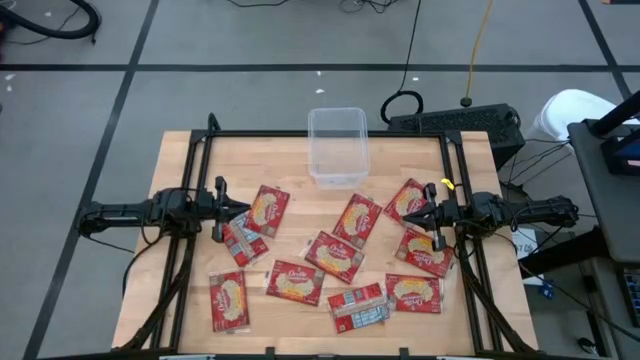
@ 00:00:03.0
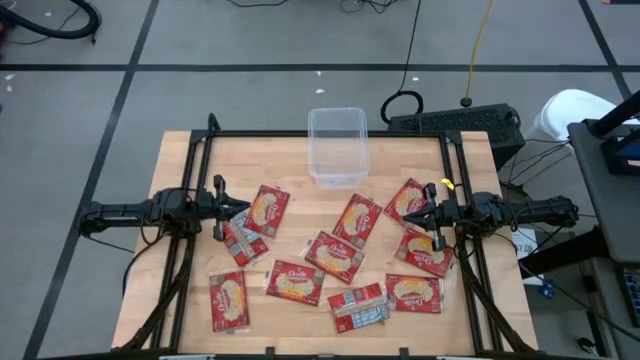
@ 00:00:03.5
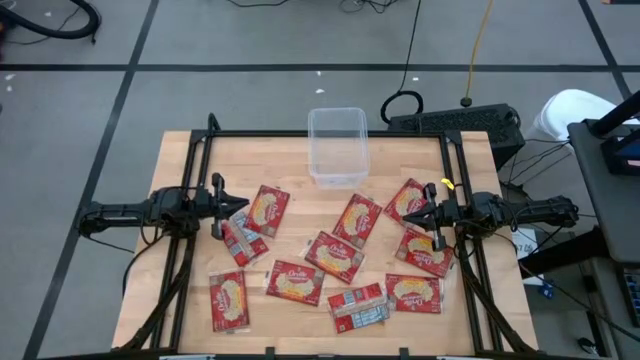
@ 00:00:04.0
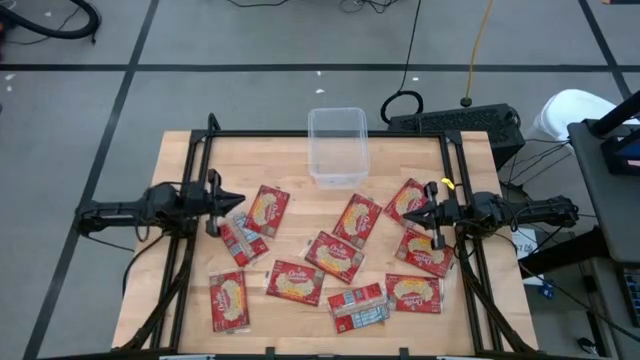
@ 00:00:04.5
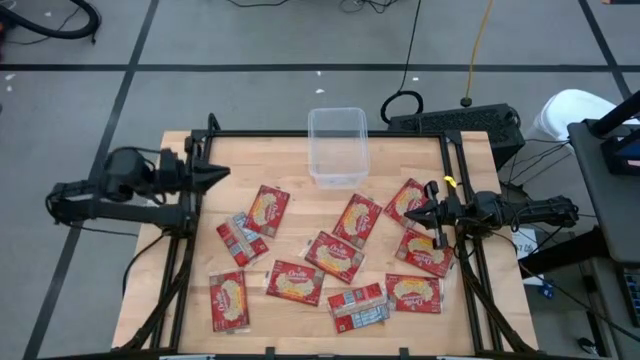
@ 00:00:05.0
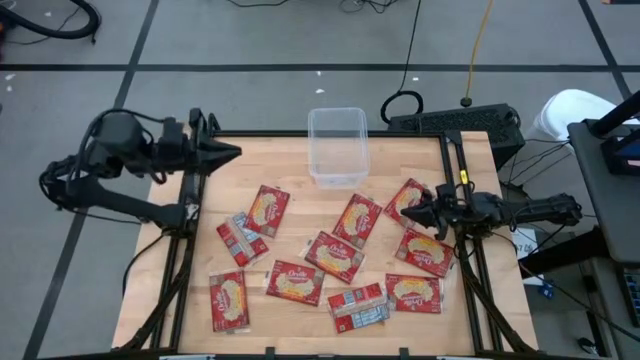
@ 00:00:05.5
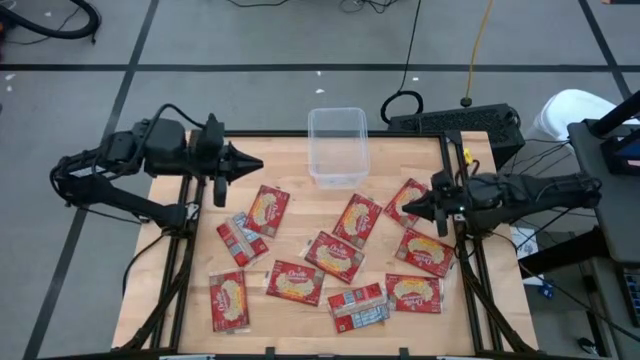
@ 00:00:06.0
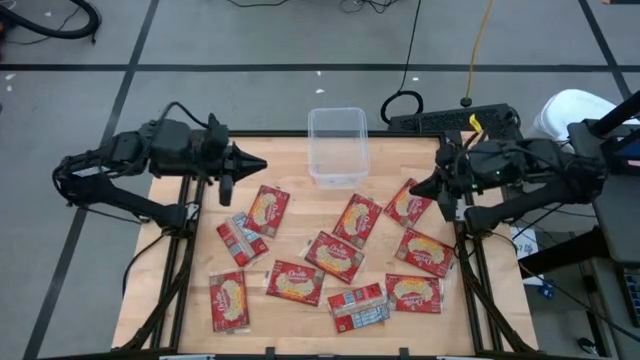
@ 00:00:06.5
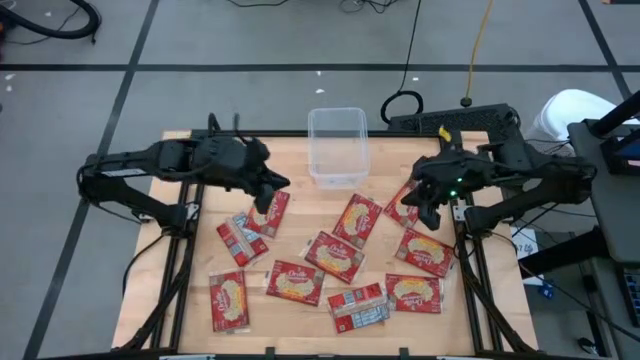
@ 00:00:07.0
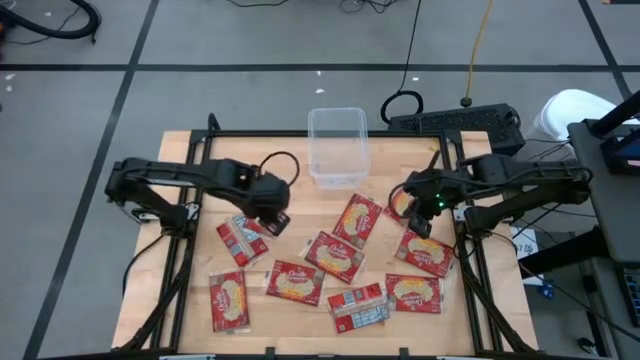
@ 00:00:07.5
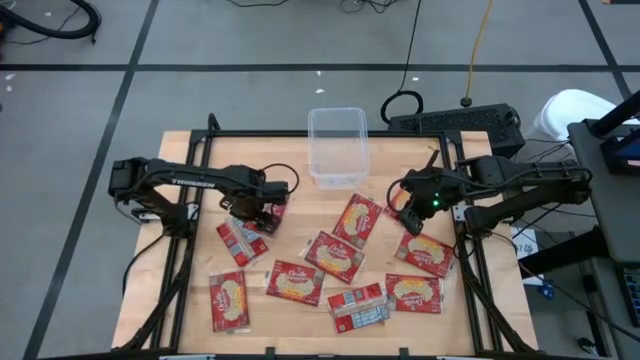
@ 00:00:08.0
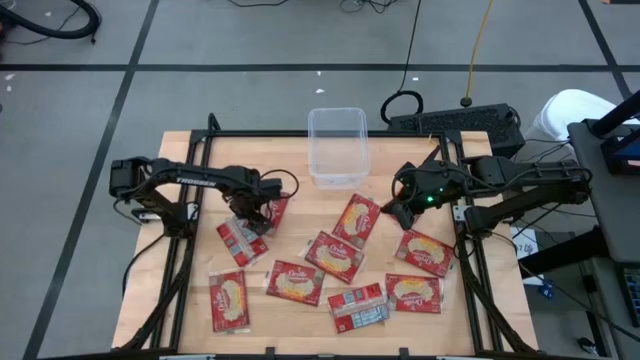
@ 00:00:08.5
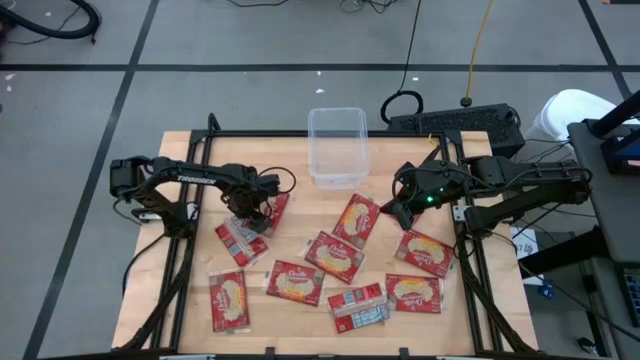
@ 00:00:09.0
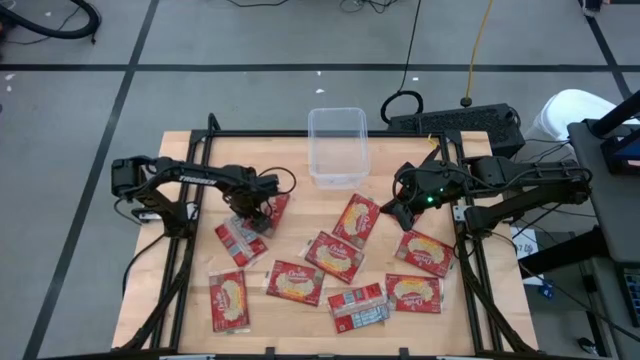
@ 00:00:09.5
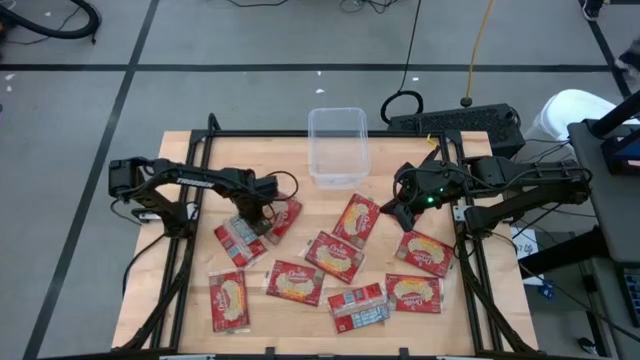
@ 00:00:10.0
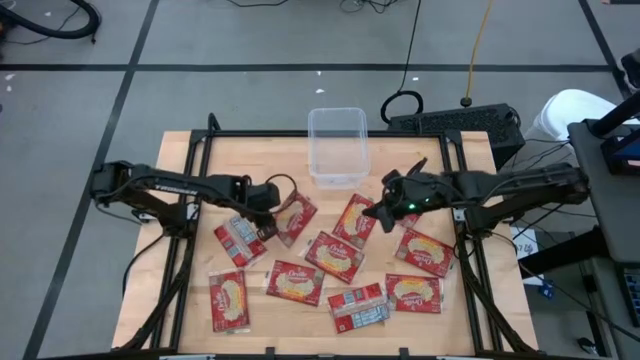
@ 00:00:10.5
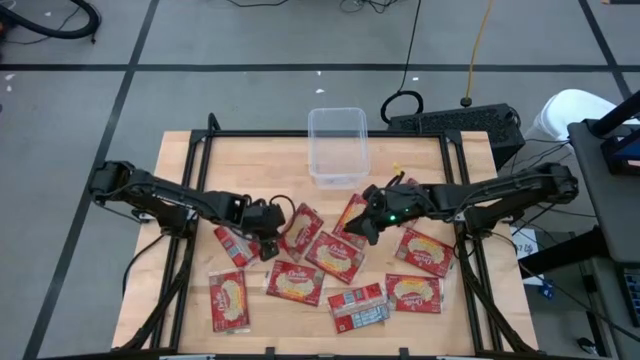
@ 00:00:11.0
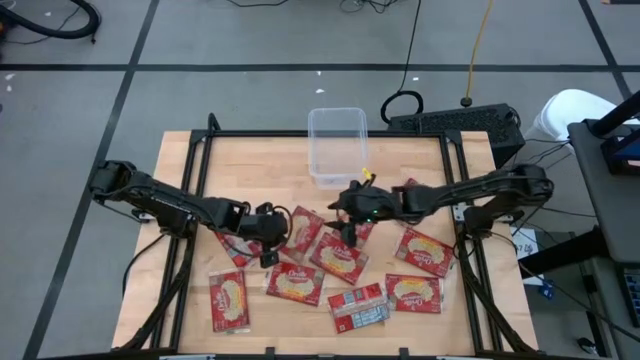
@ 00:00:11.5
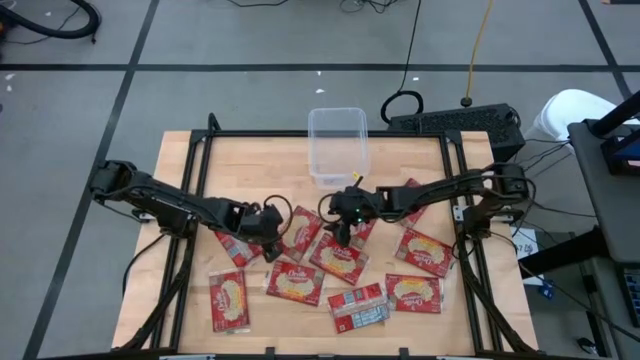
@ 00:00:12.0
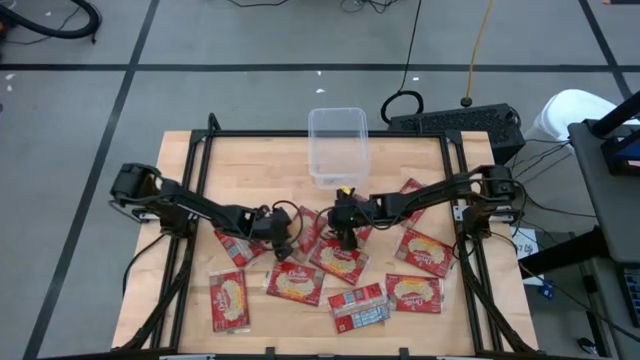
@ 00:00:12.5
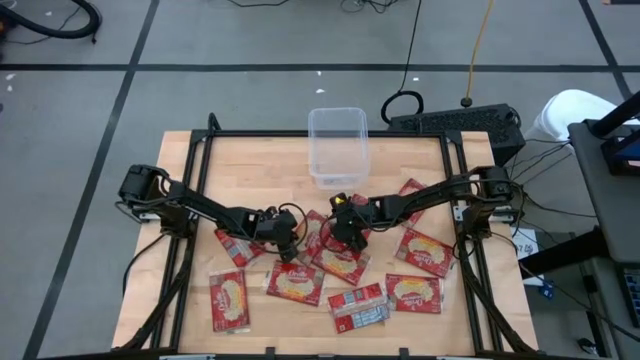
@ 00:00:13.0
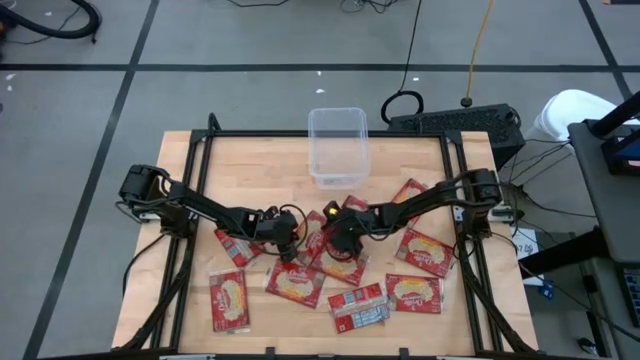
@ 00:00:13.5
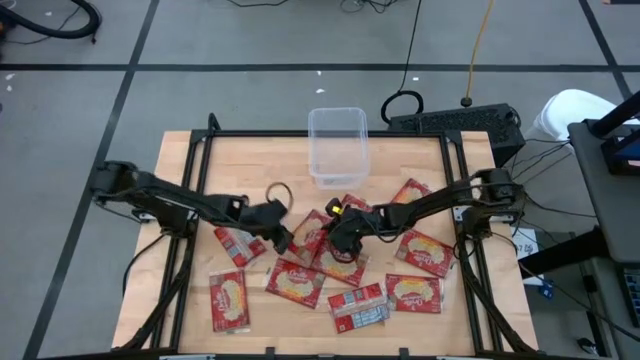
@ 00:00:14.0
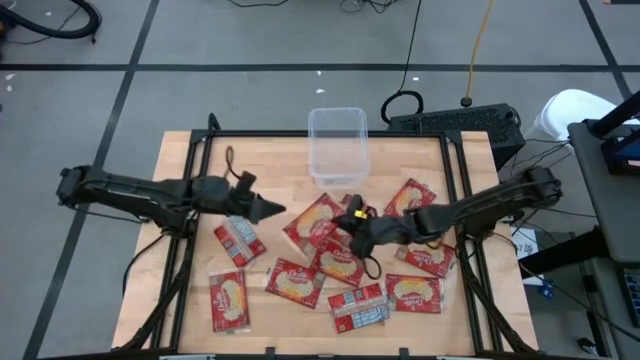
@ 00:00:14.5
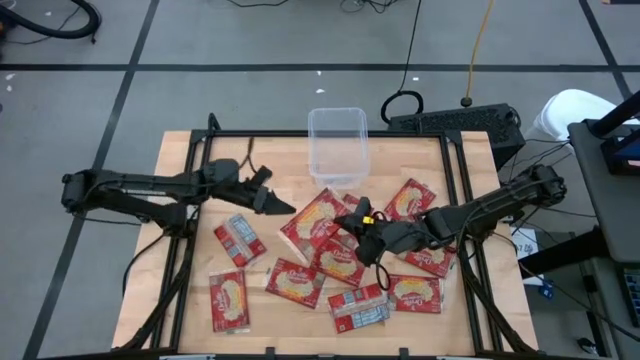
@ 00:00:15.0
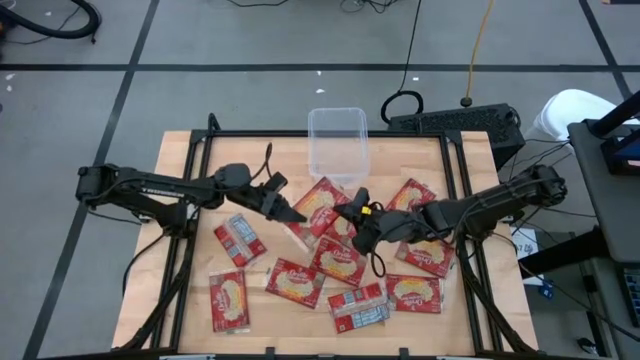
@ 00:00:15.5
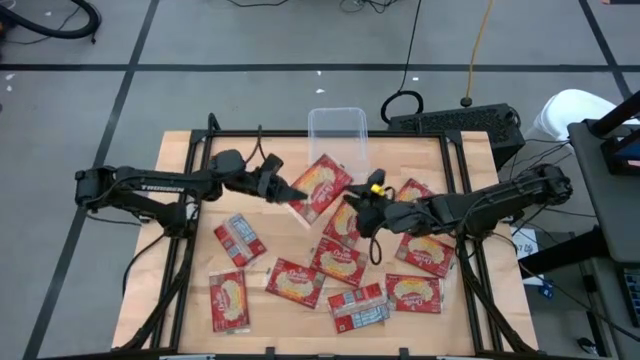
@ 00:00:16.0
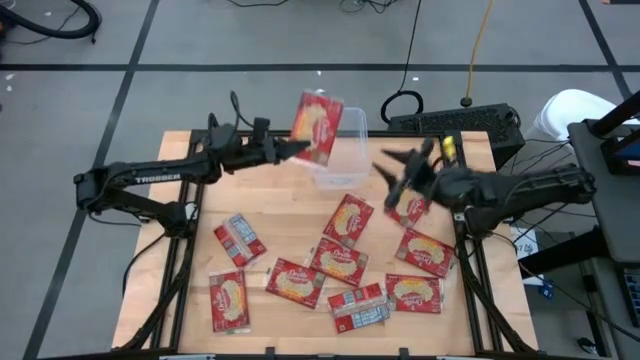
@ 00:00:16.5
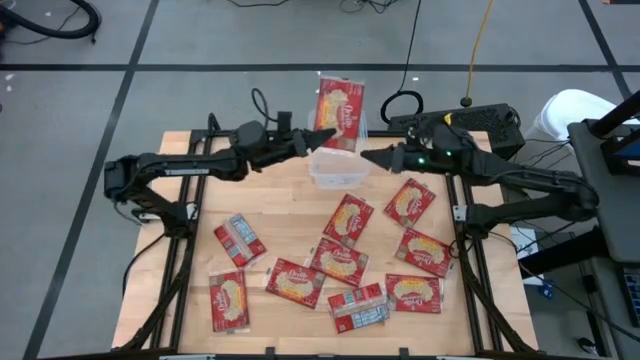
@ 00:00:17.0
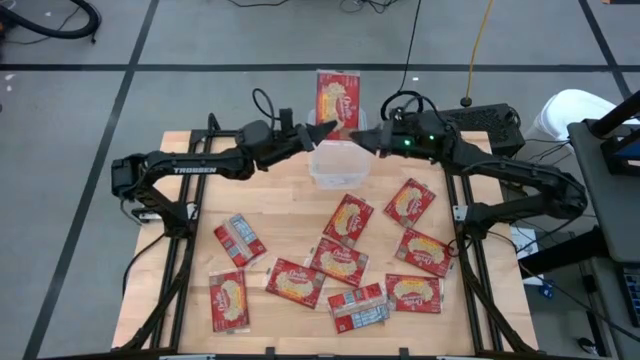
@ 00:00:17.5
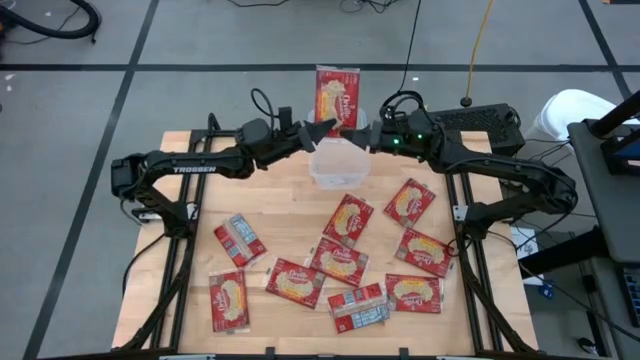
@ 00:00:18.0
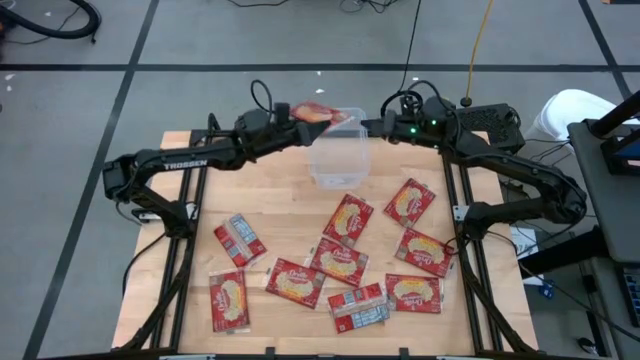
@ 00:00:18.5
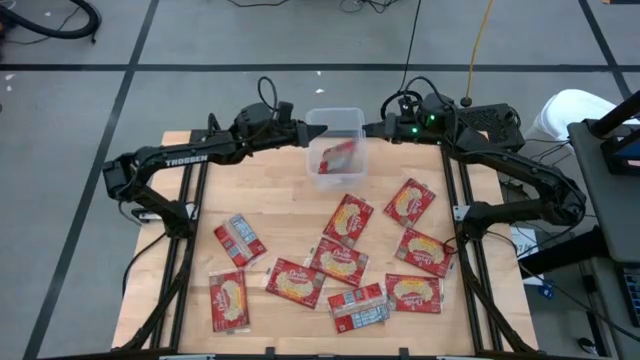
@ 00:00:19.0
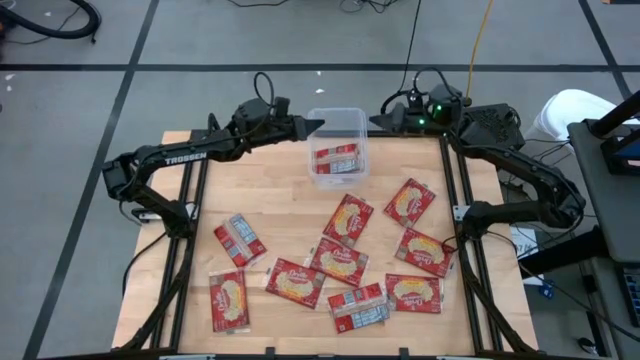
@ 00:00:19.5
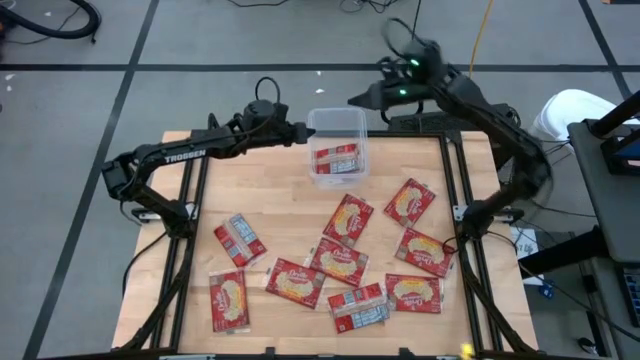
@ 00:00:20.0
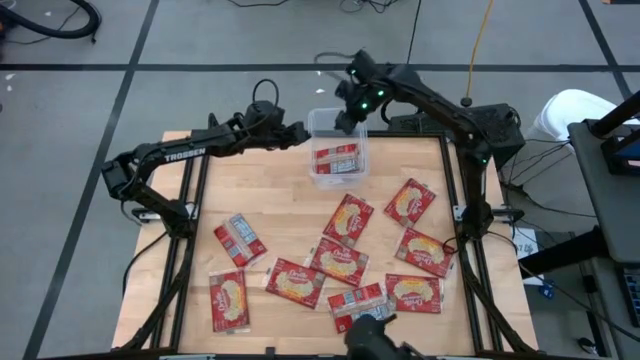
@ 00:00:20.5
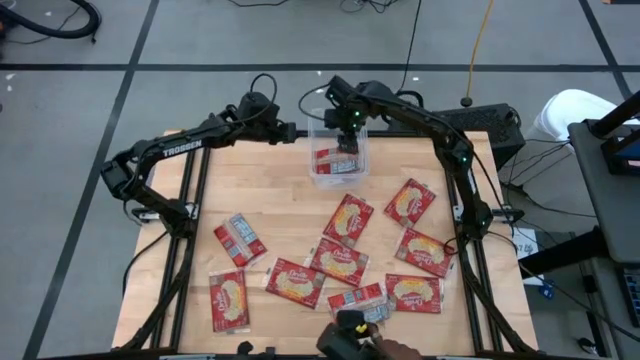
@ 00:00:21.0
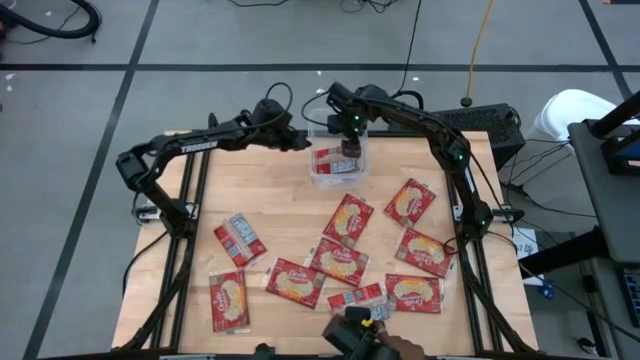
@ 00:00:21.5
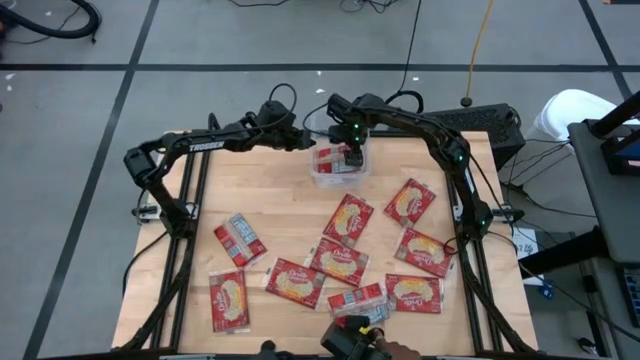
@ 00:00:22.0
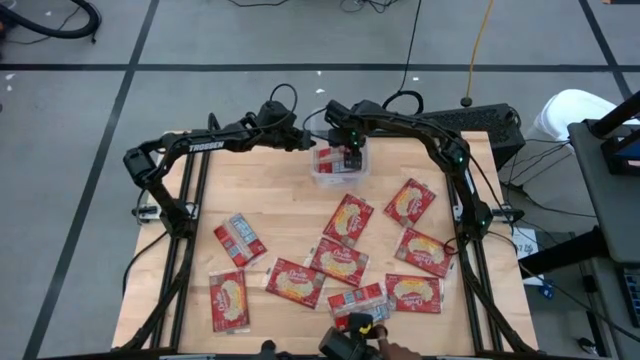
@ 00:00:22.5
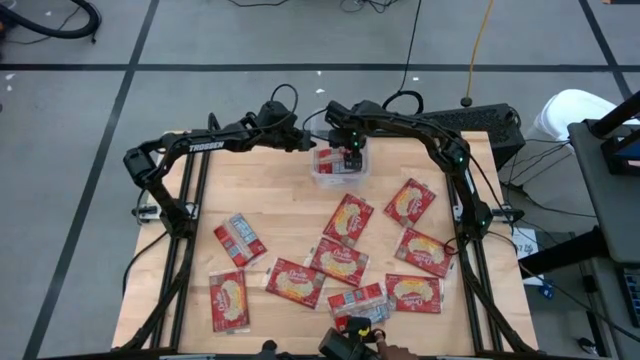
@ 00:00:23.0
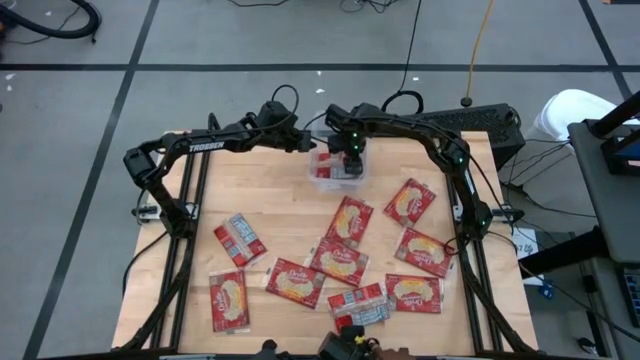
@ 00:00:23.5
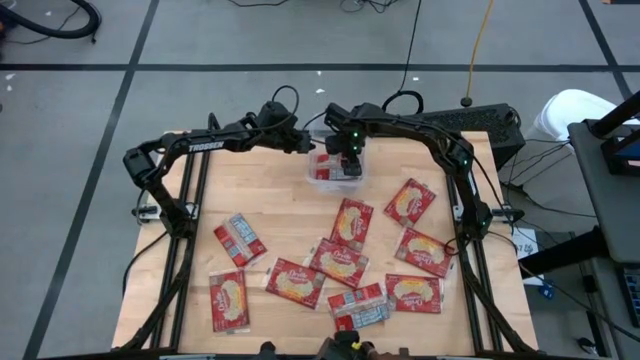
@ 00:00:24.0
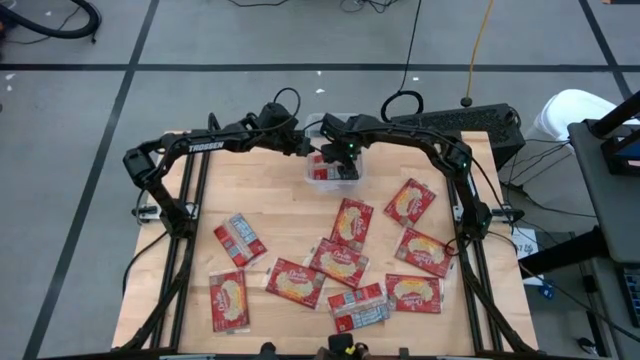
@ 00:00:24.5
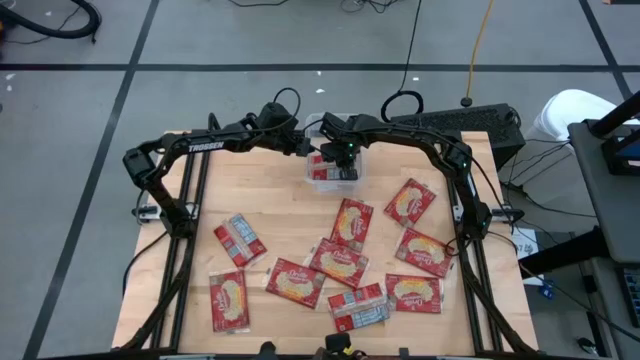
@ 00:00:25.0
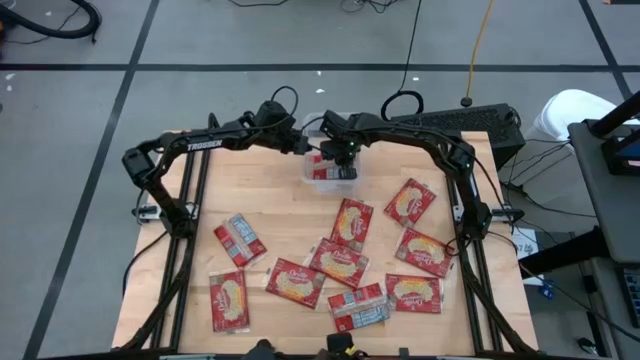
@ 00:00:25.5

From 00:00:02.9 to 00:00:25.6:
Task: Sort popcorn bags into baskets
Put the red popcorn bag into the transparent container
